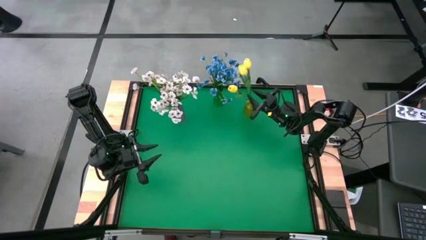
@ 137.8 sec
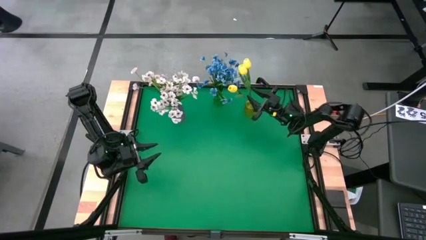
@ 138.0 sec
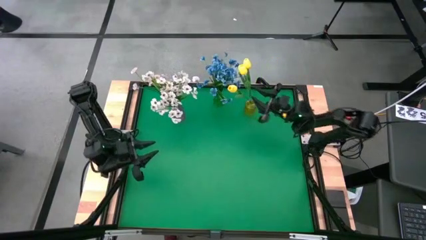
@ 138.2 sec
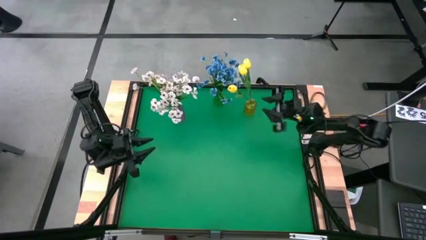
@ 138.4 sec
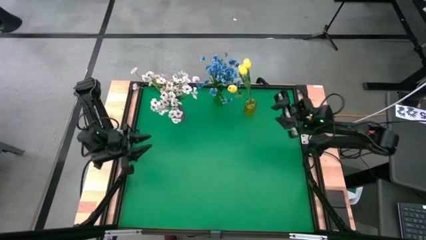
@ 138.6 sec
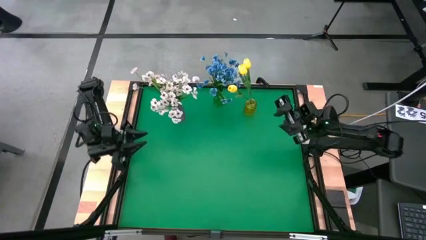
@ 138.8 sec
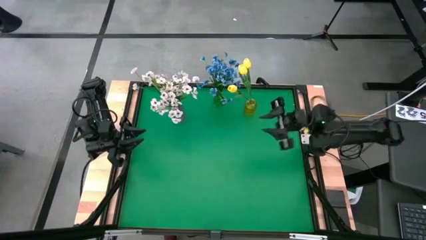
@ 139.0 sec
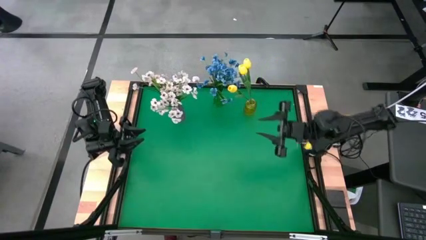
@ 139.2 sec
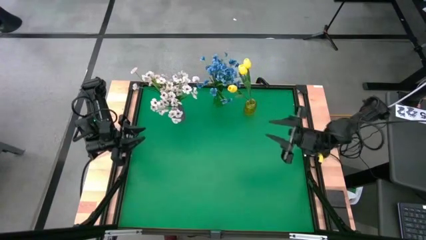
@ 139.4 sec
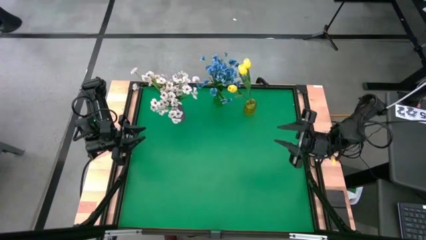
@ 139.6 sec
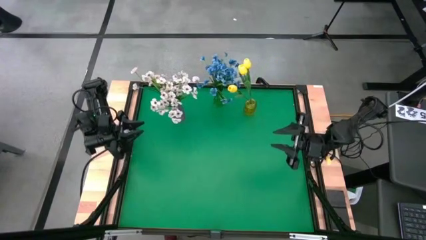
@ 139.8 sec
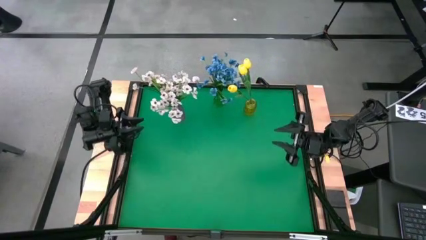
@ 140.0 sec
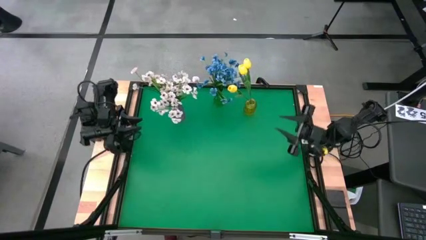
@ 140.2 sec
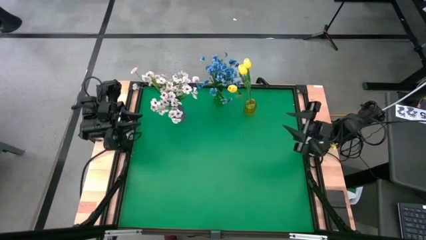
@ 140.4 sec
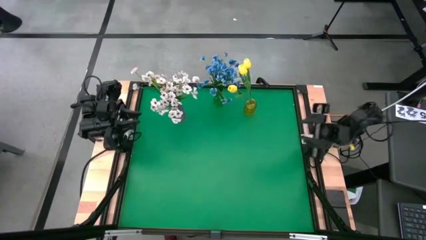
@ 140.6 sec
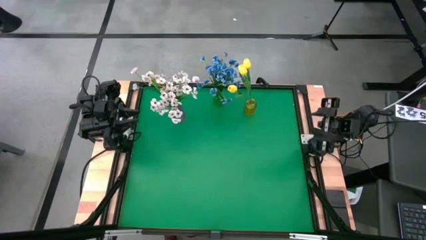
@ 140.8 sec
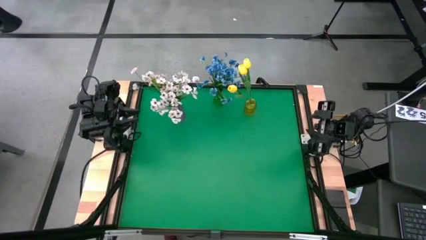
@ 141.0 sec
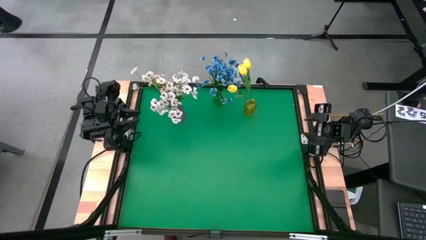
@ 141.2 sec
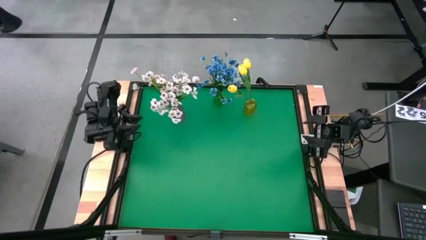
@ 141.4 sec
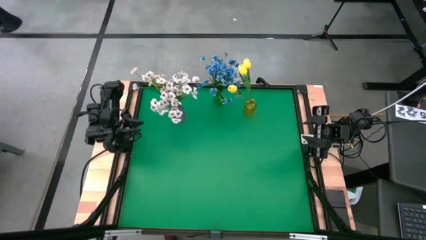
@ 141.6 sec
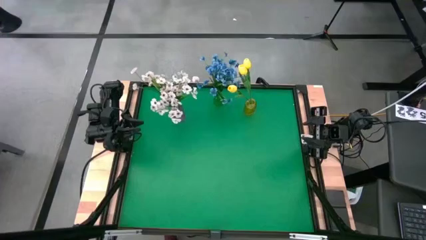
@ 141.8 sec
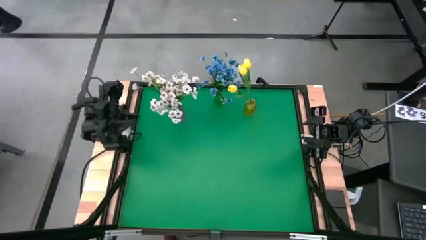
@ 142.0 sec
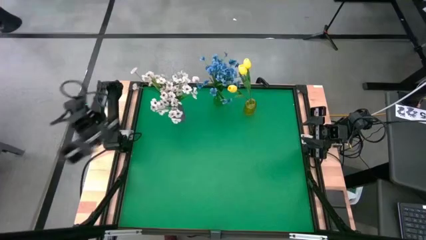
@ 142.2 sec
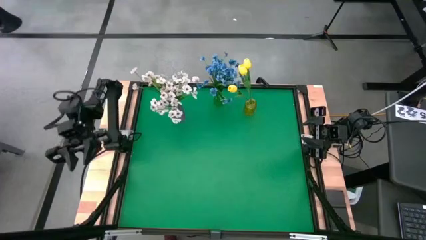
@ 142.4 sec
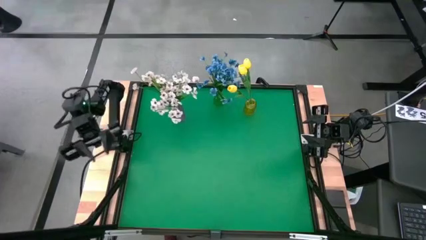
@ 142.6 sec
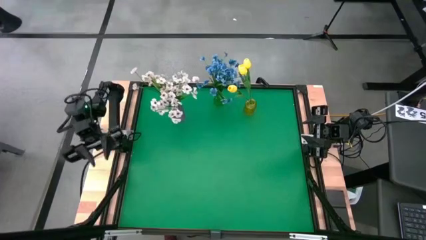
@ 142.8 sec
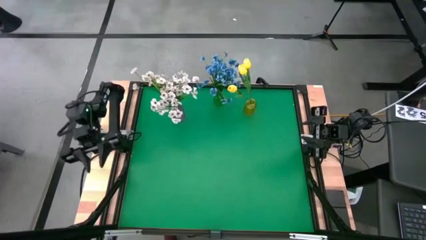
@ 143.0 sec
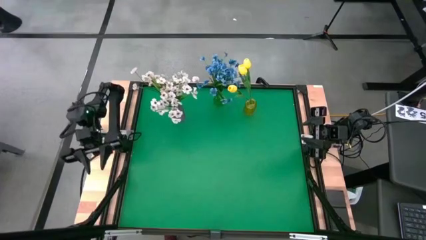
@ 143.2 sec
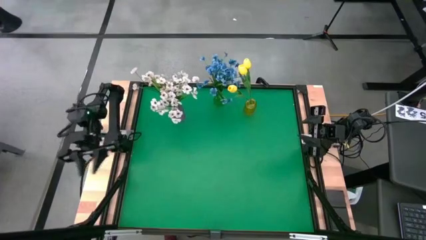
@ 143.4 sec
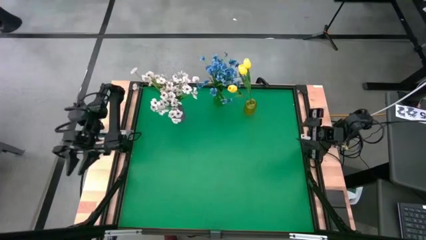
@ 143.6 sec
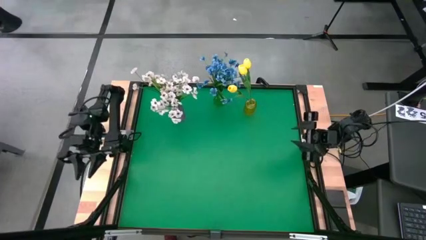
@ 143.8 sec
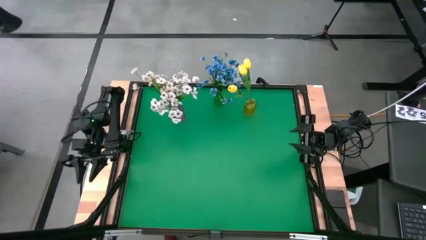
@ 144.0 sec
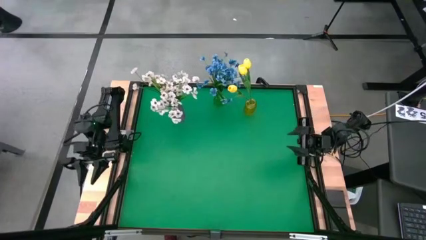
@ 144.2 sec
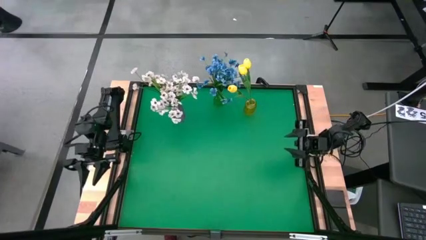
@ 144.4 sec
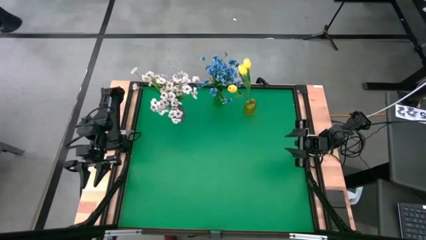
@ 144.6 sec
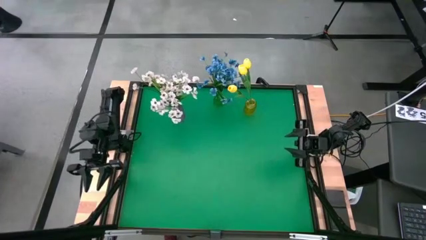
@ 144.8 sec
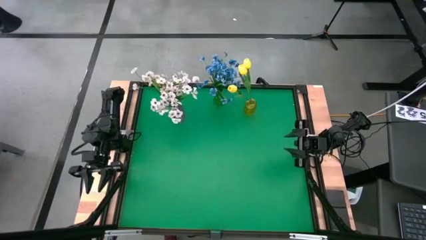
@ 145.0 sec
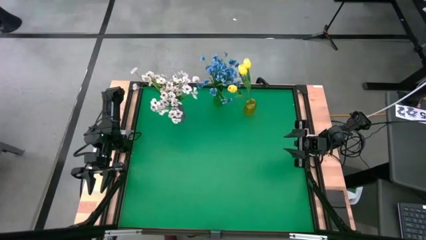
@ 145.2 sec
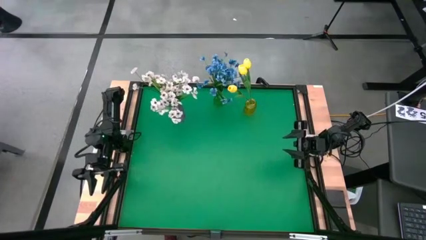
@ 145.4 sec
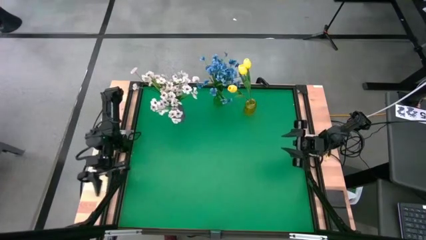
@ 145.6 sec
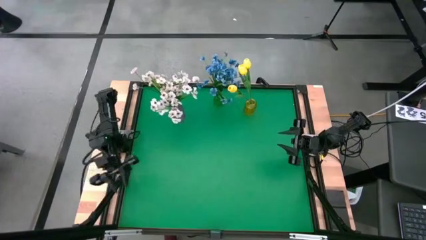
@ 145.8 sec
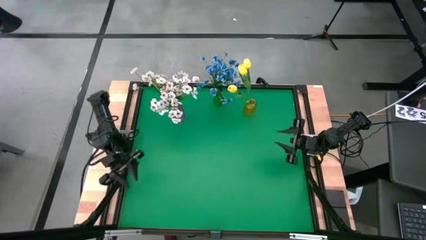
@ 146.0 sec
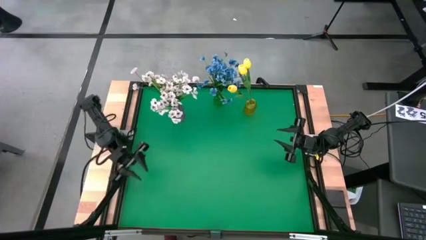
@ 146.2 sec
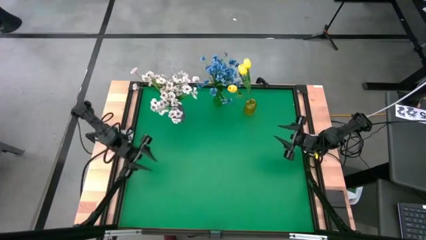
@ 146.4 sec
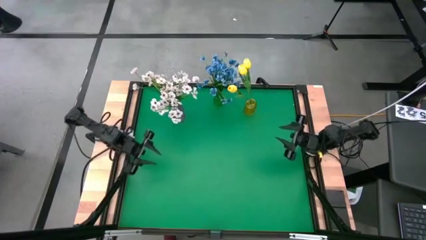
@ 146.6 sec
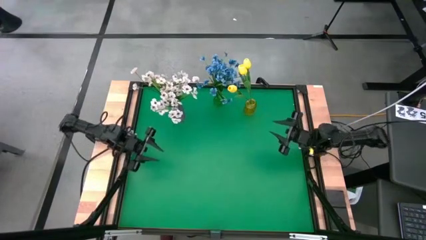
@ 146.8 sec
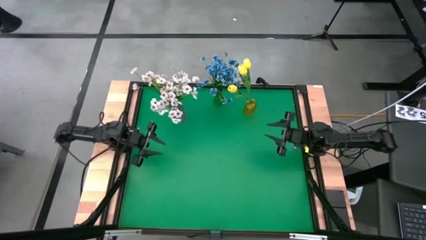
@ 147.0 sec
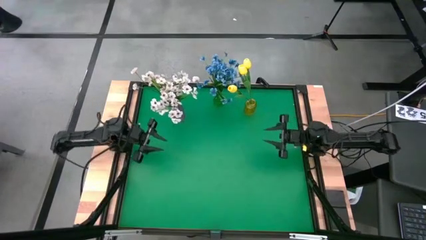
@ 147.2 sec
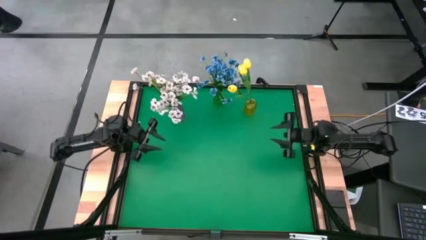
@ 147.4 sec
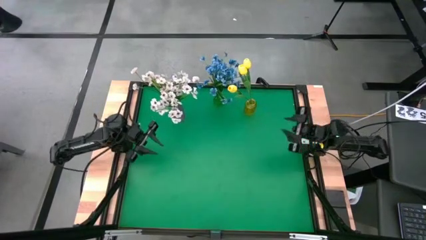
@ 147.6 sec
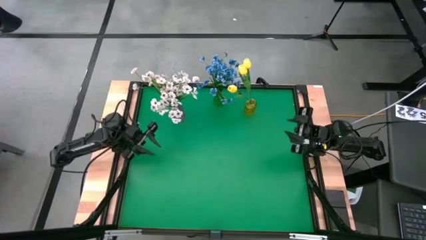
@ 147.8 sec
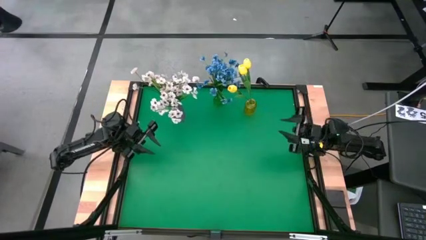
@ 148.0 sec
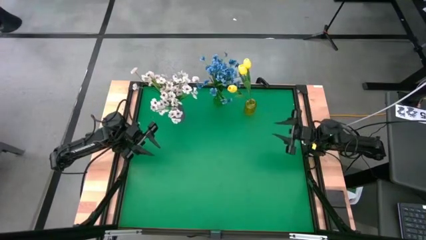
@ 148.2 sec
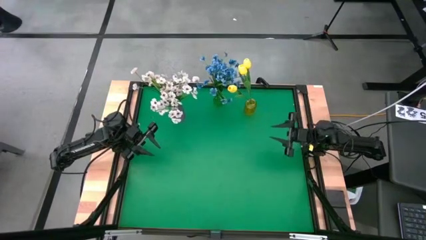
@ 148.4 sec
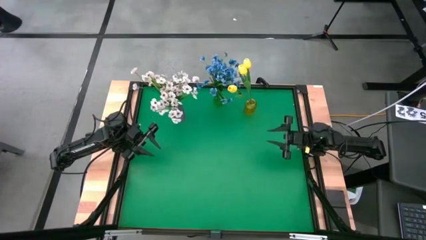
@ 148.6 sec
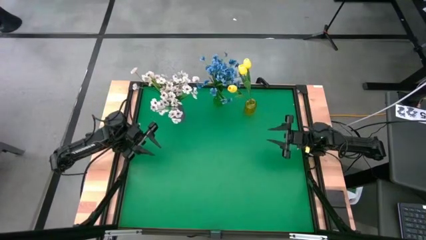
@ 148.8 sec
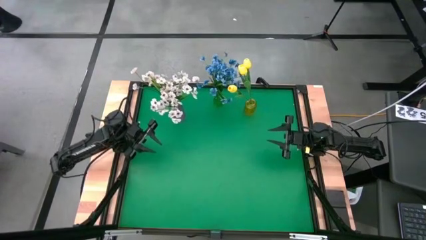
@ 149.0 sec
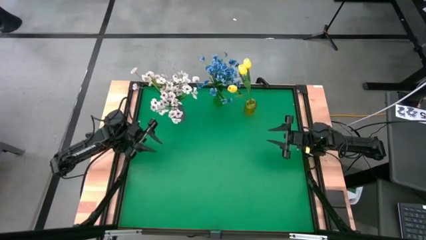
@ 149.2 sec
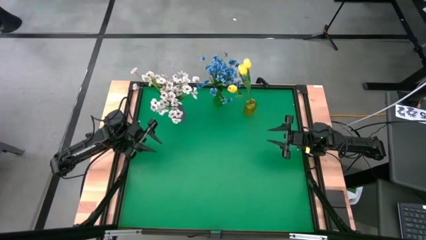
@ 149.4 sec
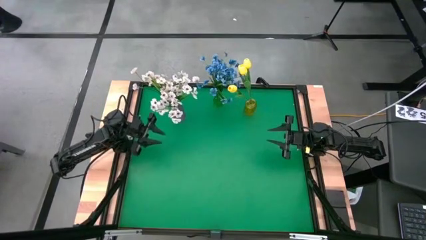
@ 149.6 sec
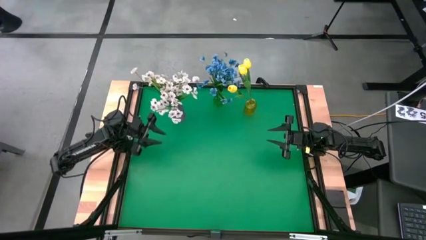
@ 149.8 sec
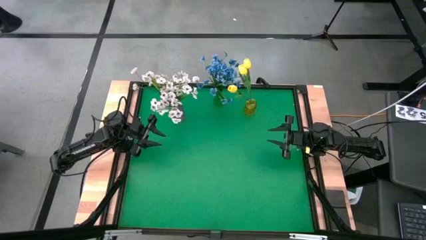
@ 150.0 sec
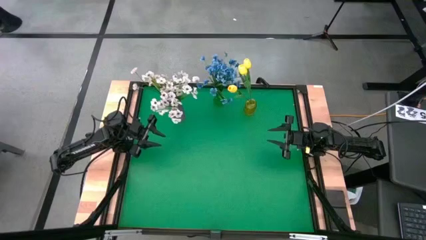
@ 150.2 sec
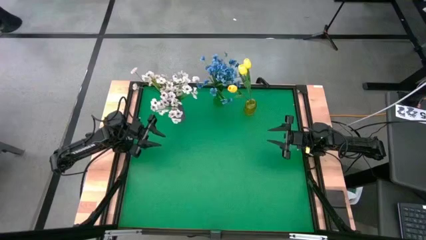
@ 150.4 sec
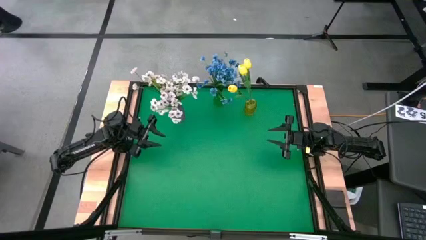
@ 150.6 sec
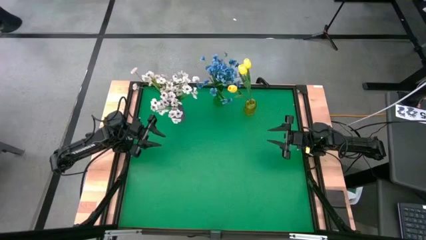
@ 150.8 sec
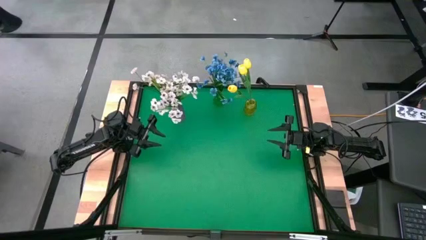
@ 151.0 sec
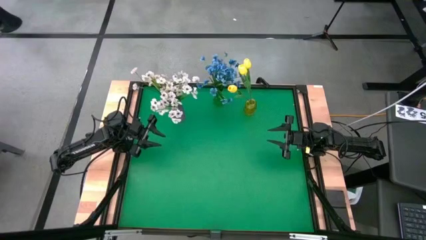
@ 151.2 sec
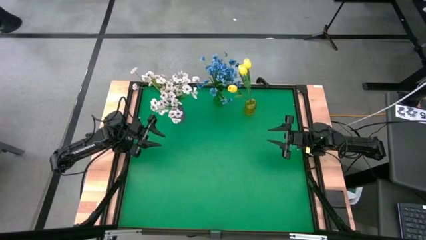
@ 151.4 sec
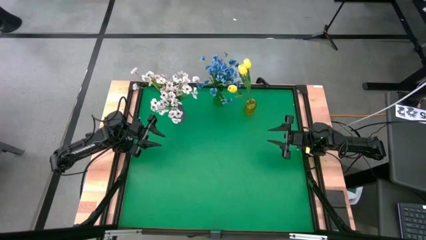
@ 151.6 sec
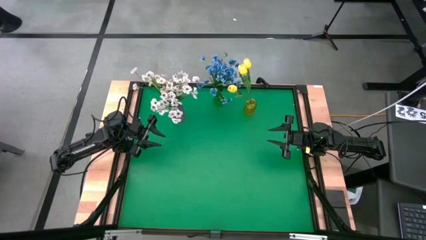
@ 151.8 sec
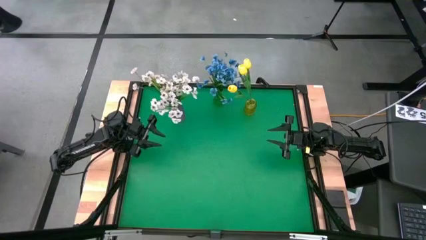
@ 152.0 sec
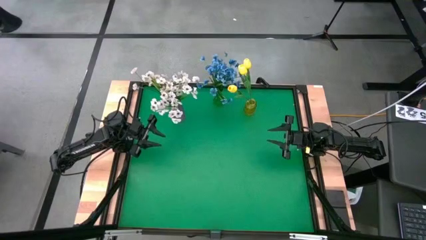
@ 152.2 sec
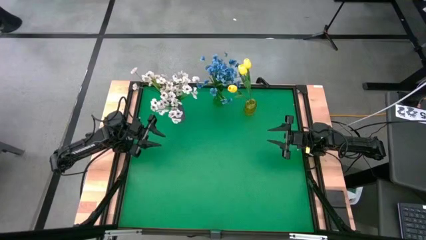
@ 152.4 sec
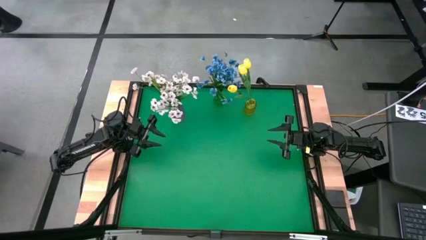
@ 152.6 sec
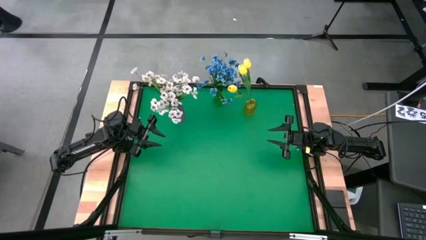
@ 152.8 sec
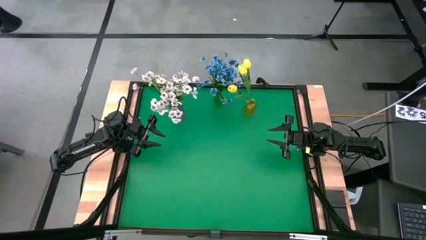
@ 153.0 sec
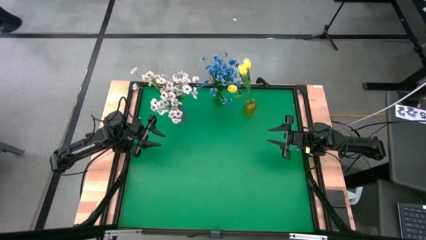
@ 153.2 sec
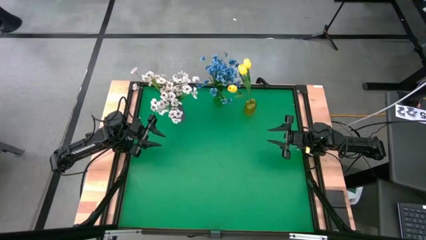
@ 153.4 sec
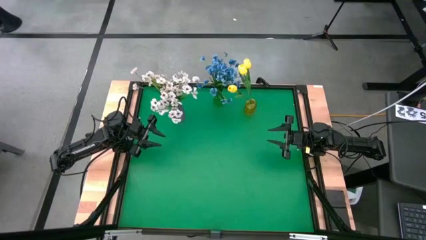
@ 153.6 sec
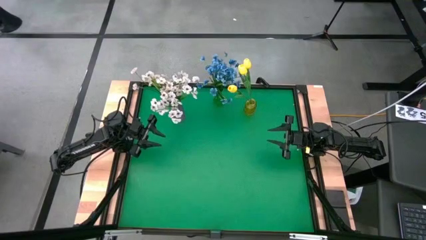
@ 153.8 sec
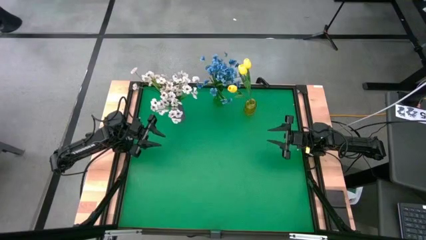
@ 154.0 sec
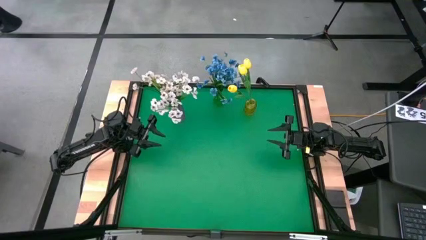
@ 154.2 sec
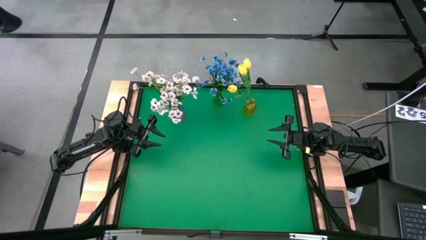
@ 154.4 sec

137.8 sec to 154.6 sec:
Task: Sort flowers into vase by color
Return to Home Position
